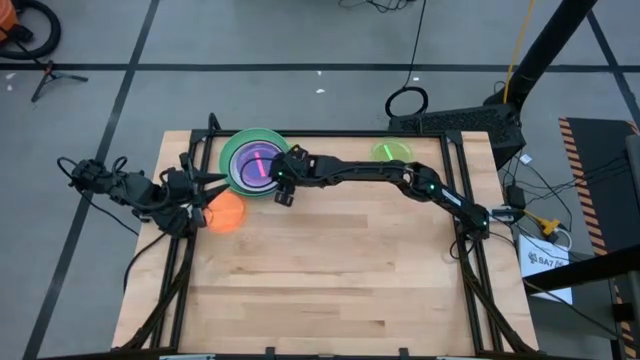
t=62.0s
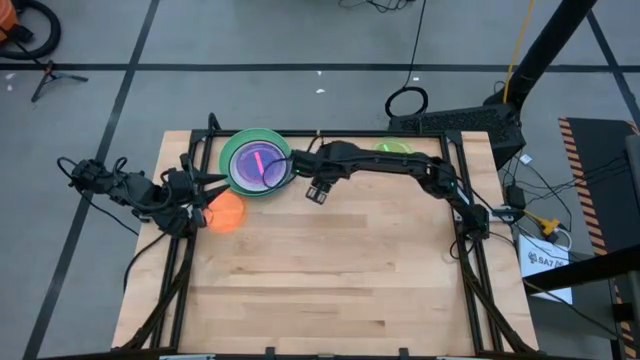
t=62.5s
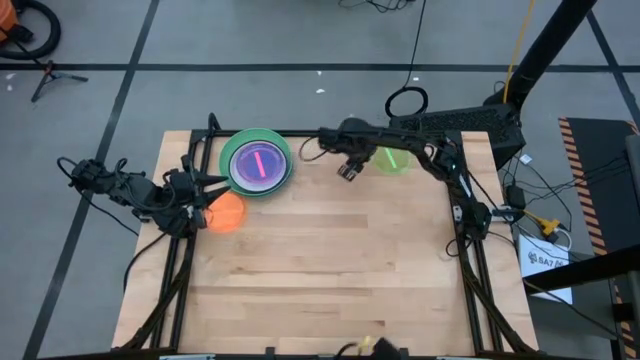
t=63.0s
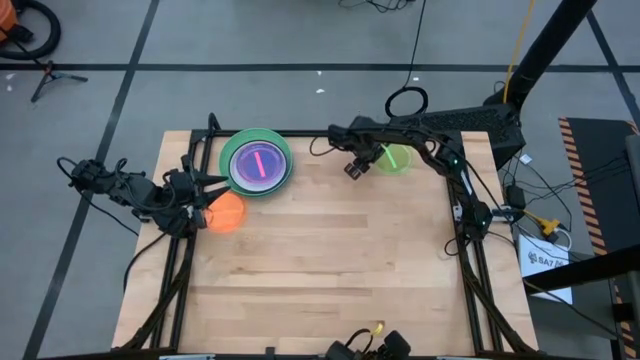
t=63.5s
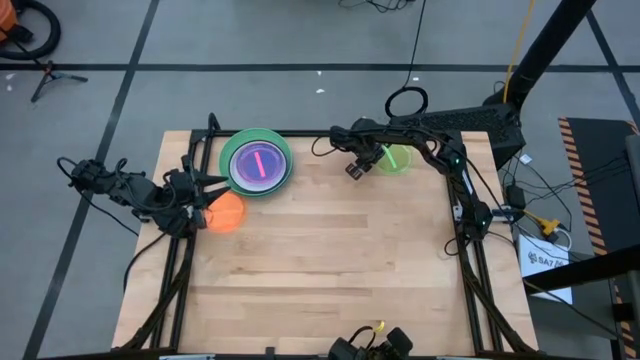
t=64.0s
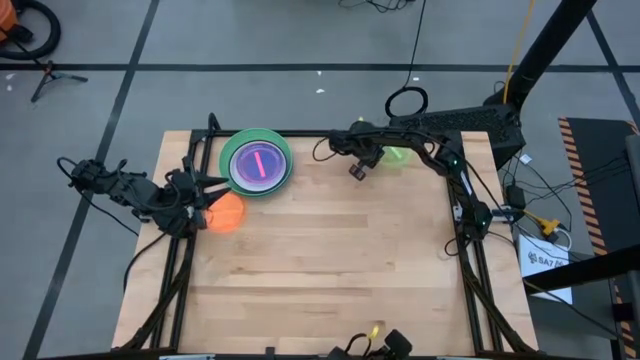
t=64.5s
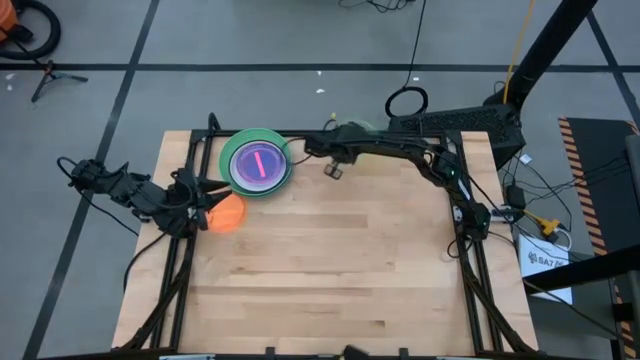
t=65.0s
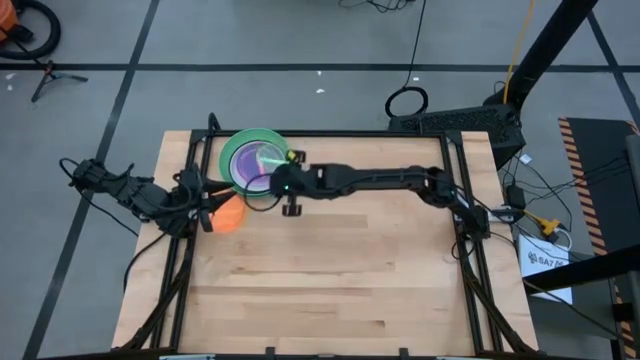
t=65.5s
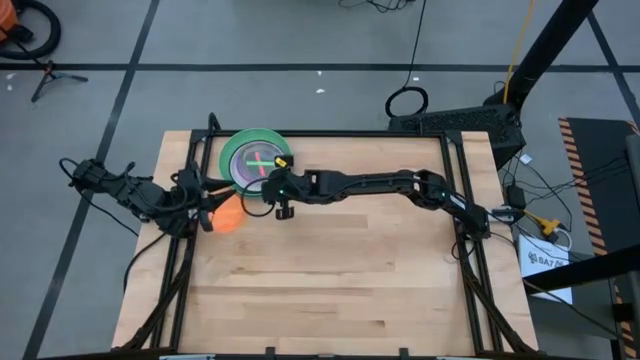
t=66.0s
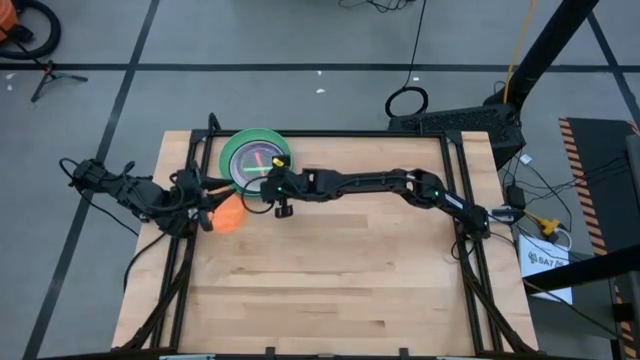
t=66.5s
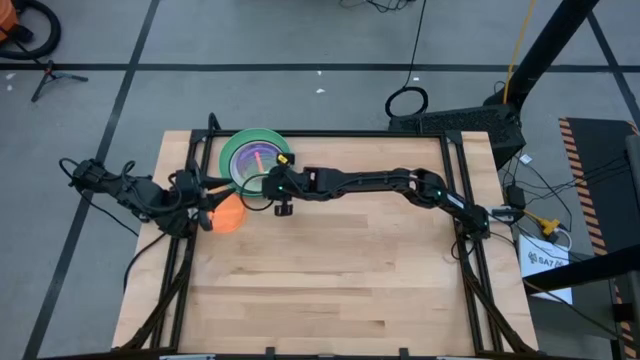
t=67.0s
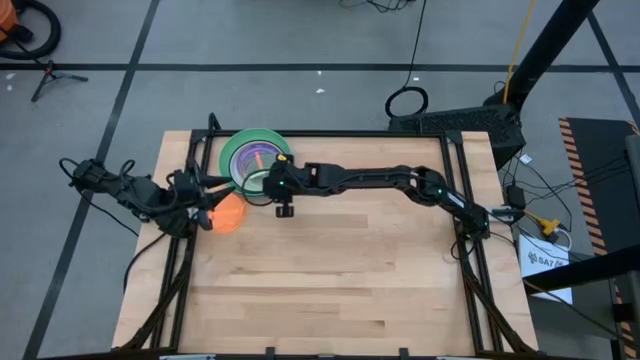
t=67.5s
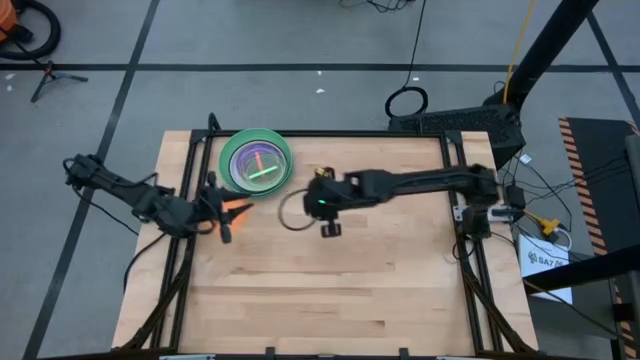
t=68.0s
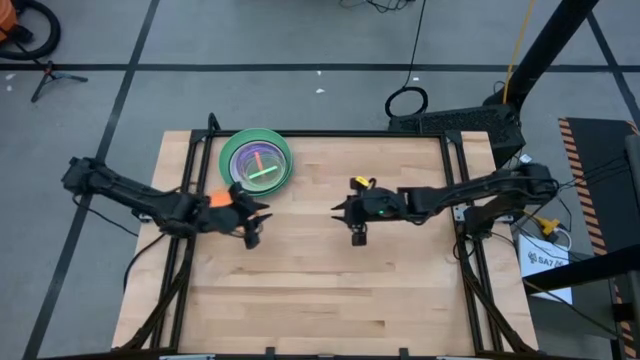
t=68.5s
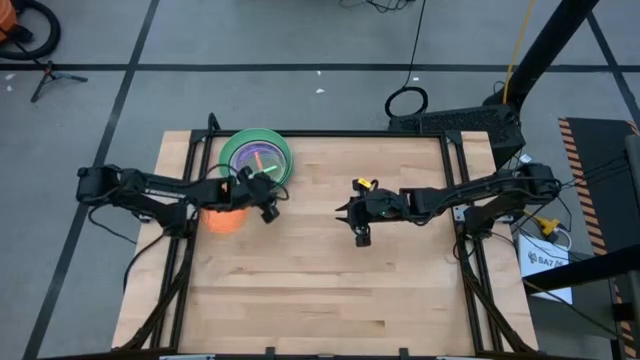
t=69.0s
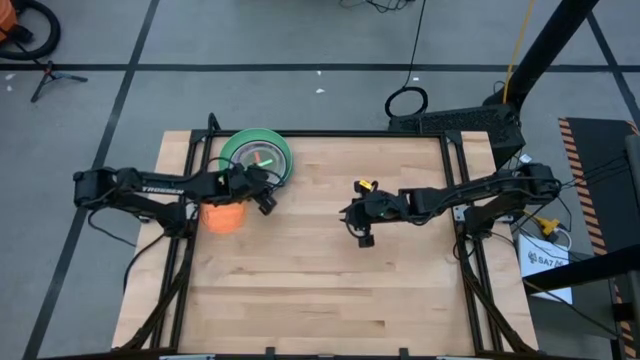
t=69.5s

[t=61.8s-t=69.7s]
Task: Stack plastic plates
Stack the small green plate on top of the small pink plate

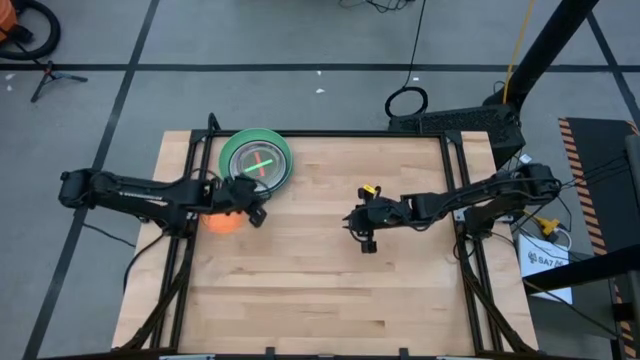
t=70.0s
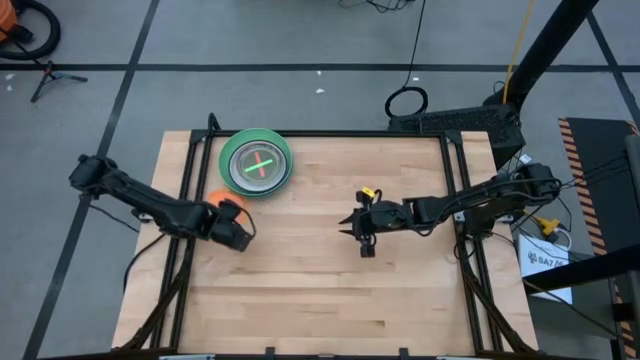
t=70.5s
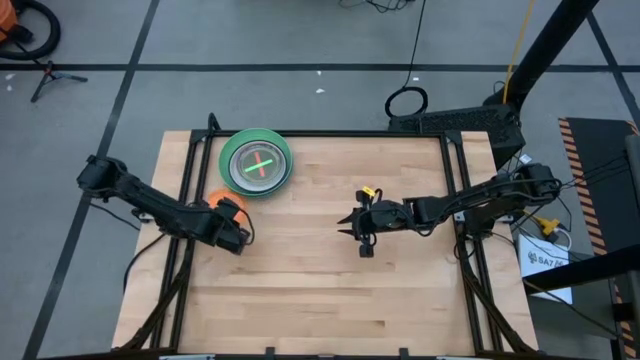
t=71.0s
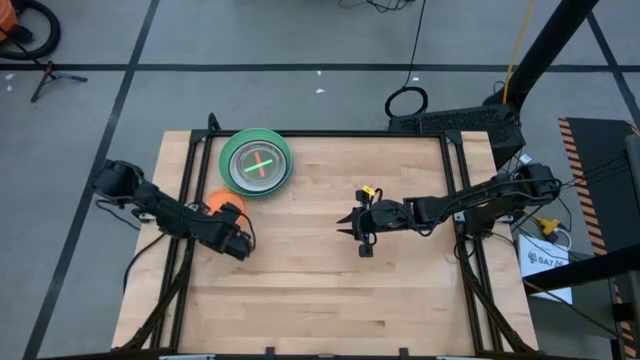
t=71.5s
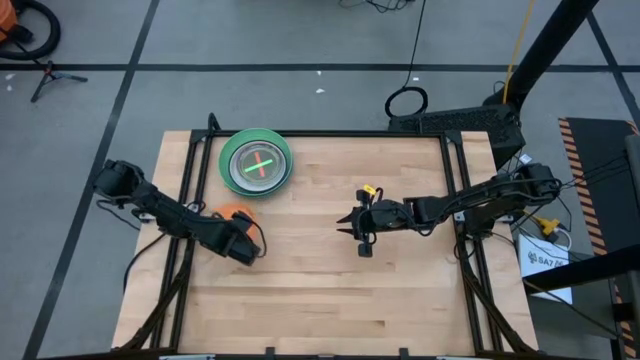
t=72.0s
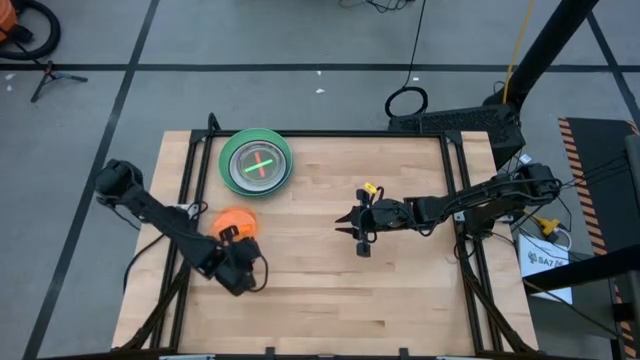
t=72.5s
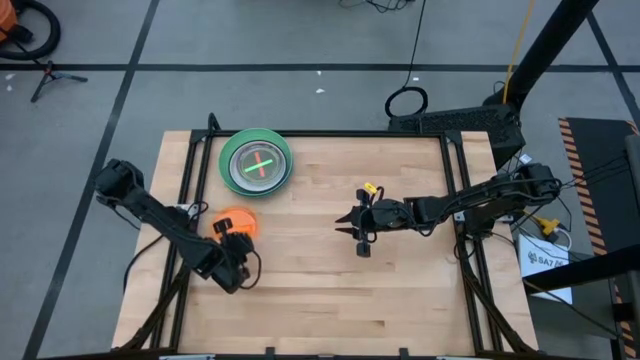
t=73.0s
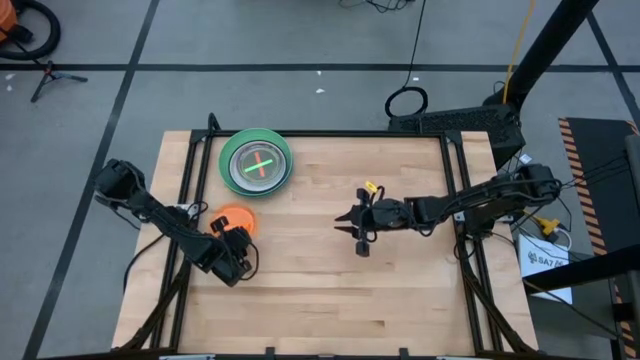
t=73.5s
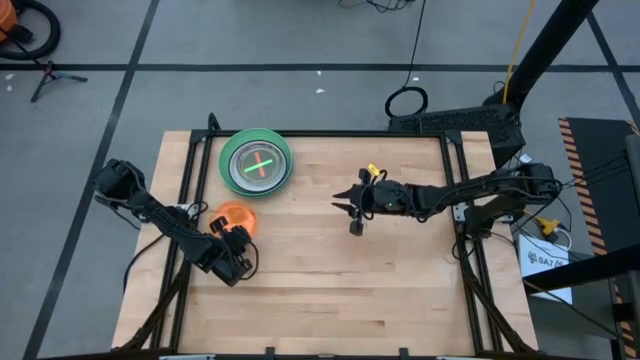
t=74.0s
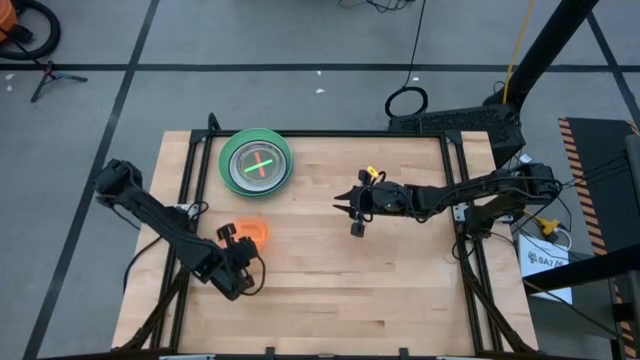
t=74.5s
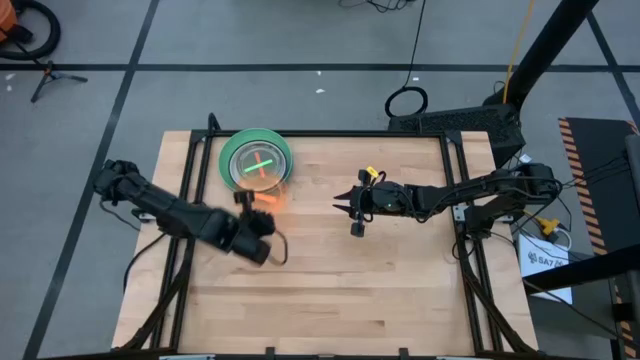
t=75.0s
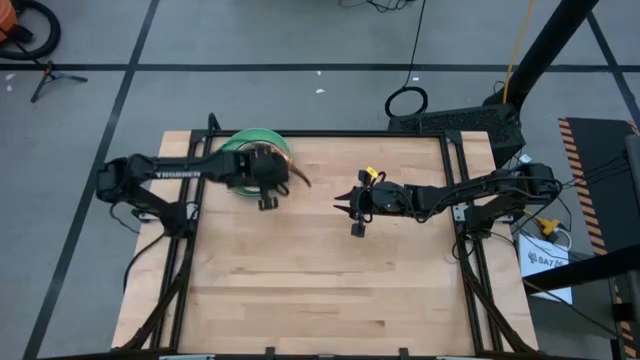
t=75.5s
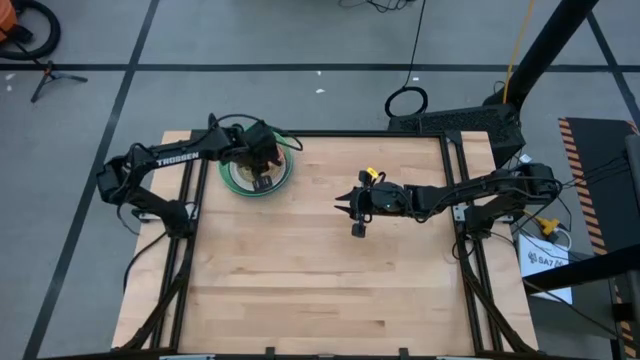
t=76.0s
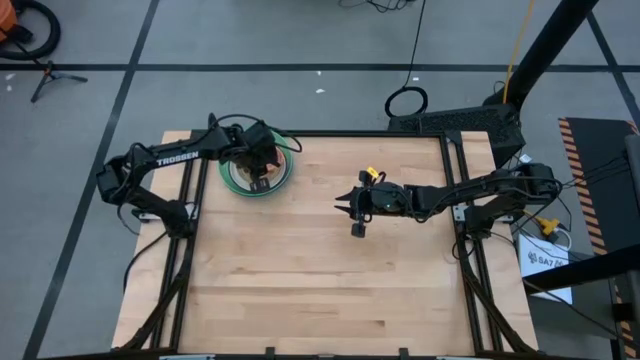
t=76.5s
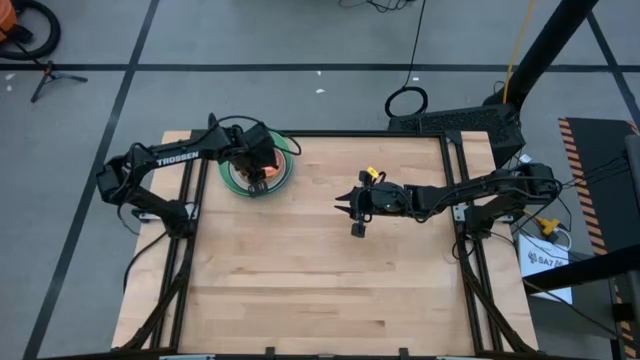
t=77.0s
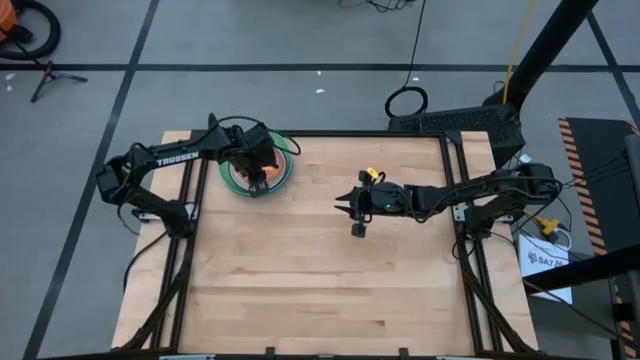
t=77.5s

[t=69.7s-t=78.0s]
Stack the small orange plate on top of the small green plate

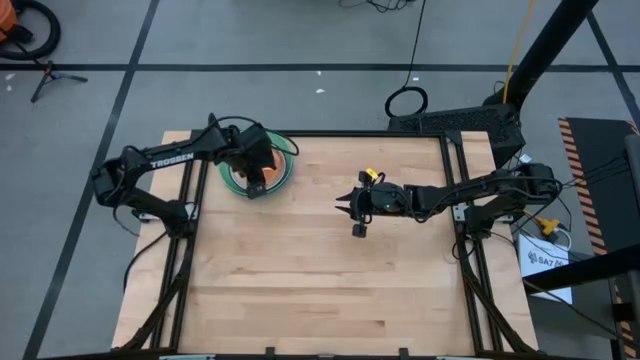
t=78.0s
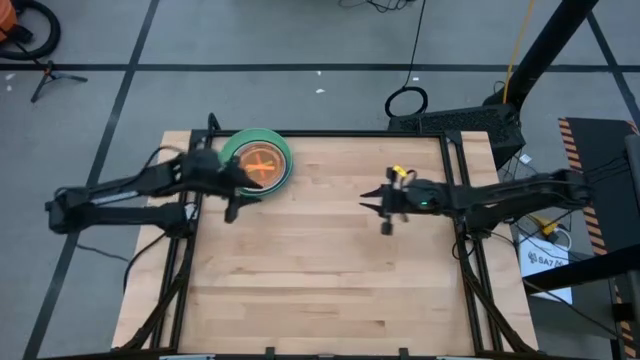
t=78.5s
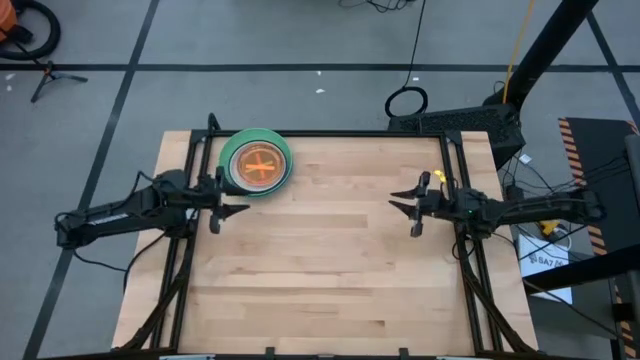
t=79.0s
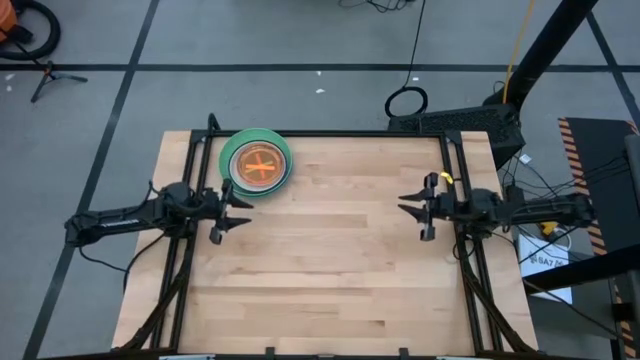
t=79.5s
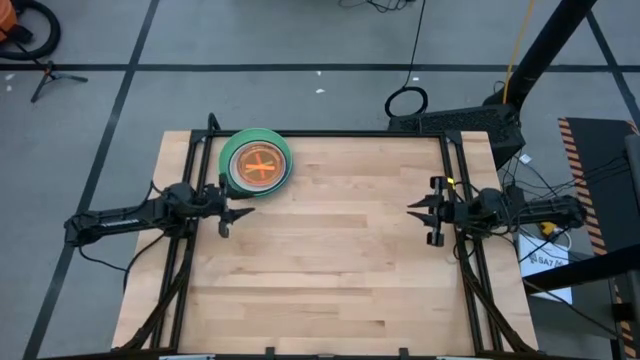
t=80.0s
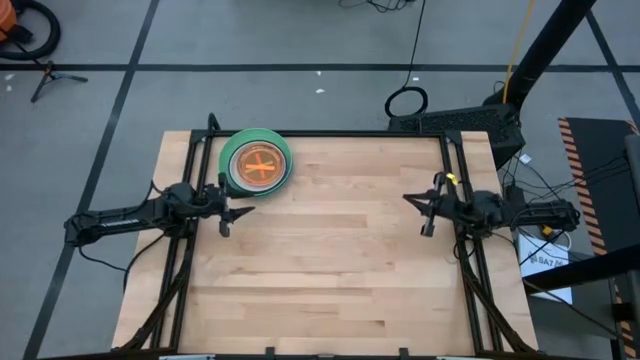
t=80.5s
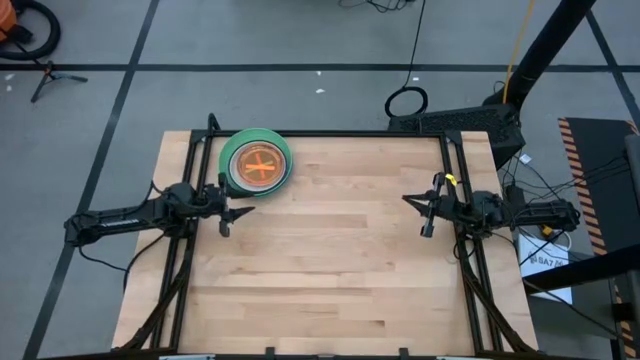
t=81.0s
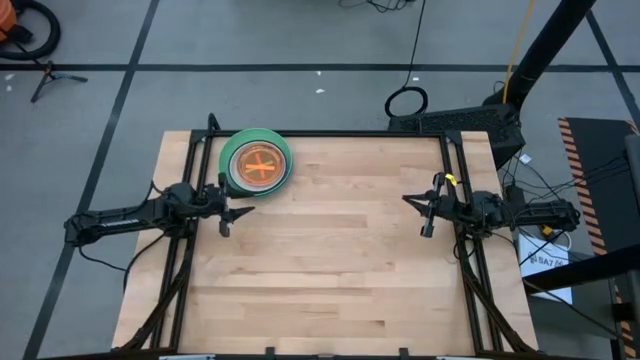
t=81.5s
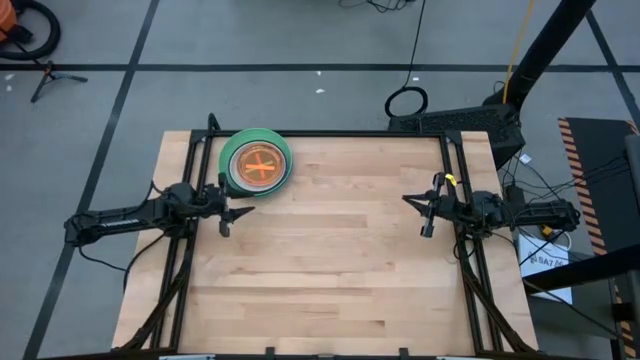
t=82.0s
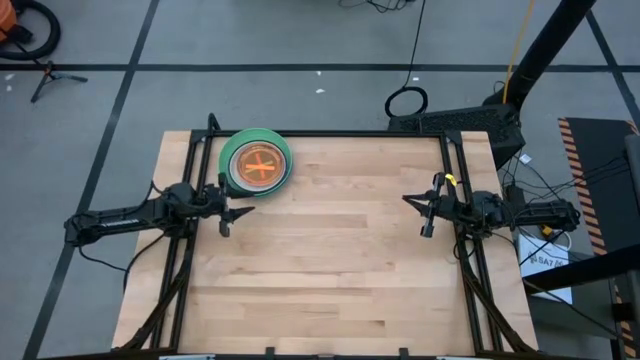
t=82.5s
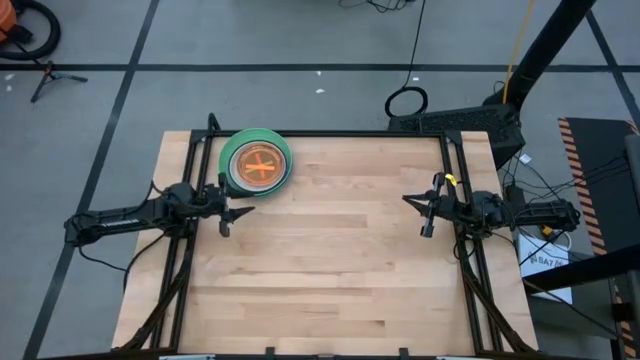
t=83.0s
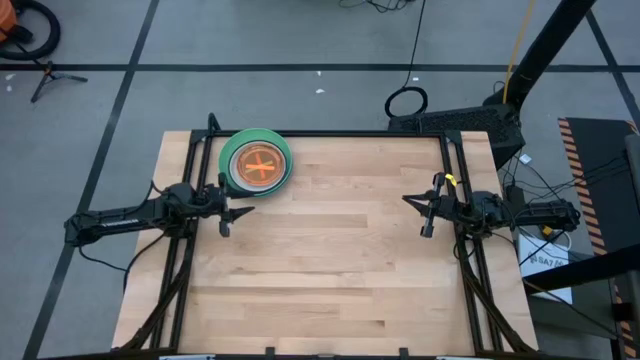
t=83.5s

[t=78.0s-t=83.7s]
Return to Home Position

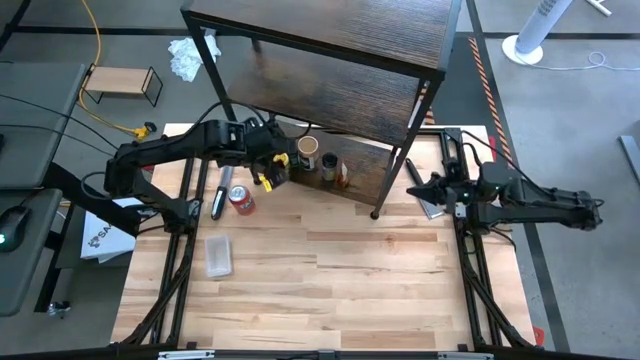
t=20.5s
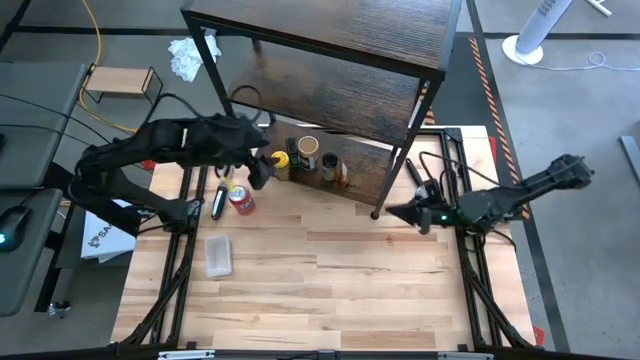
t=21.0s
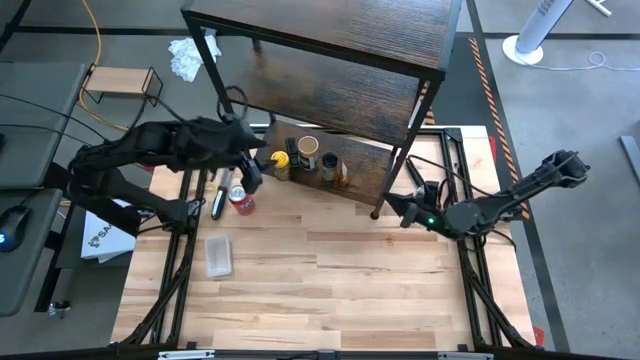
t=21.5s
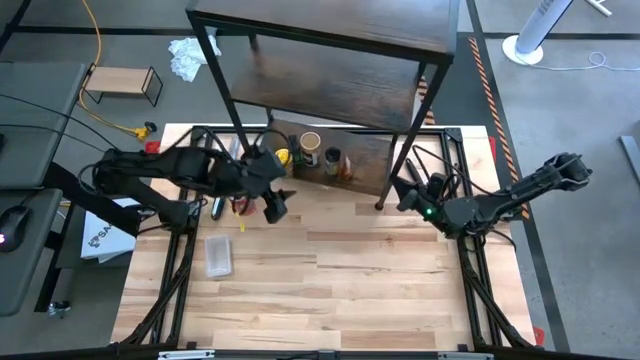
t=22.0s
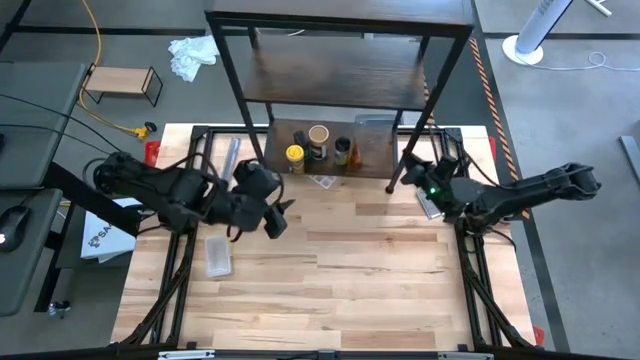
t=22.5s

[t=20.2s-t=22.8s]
Task: Shelf spices
Adjust the shelf
